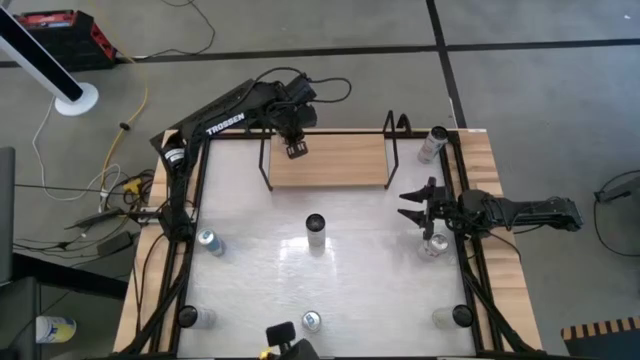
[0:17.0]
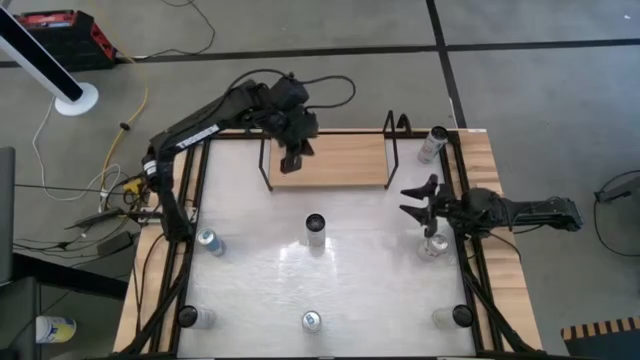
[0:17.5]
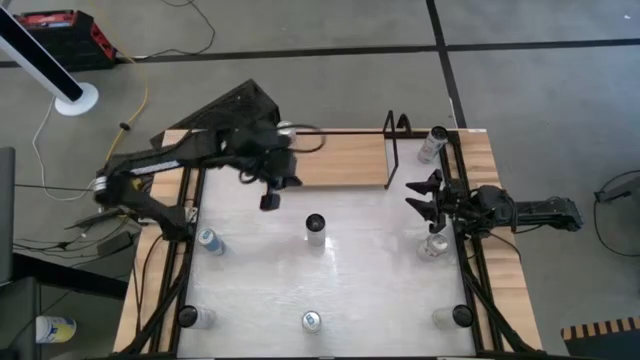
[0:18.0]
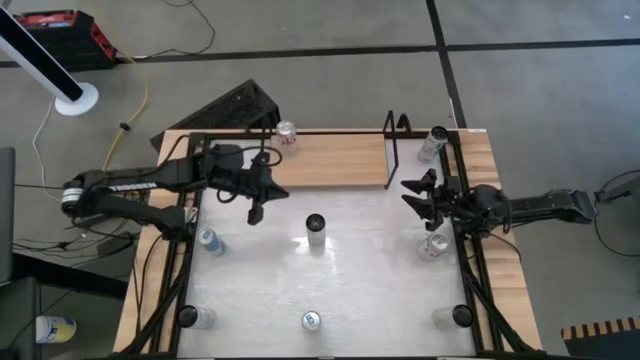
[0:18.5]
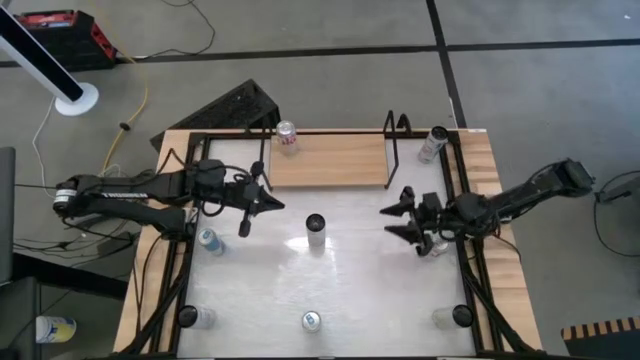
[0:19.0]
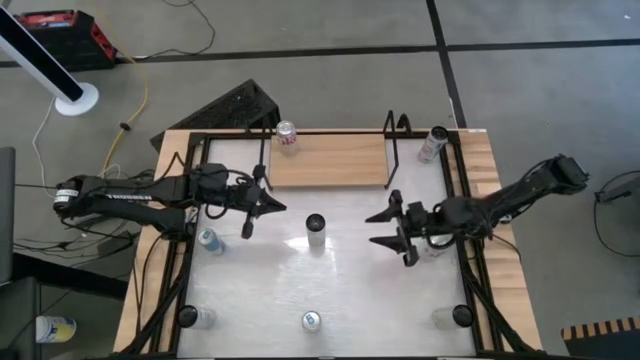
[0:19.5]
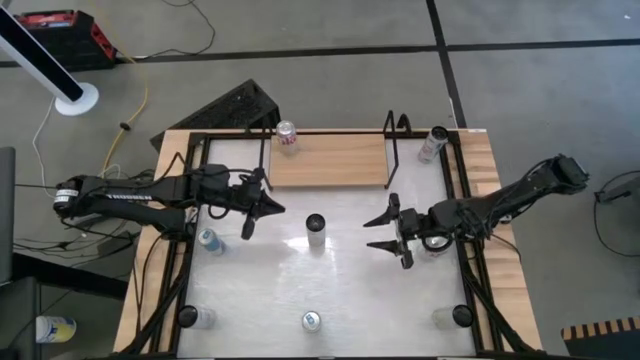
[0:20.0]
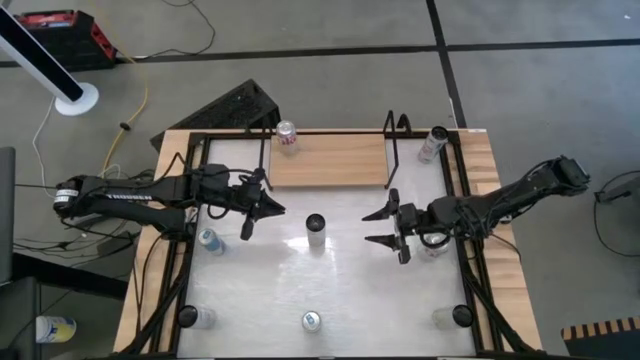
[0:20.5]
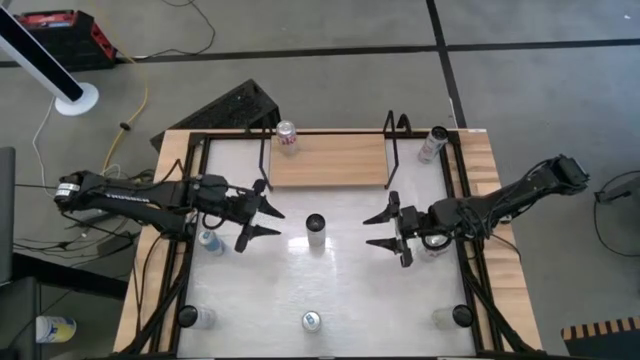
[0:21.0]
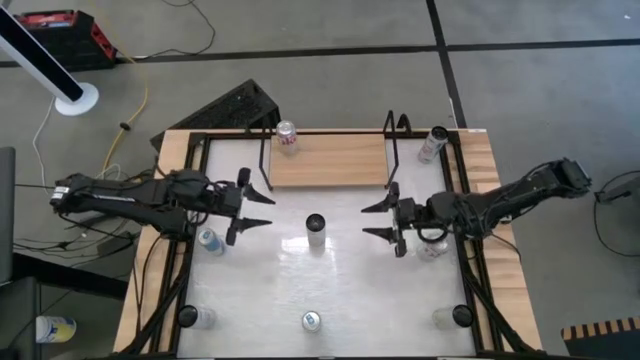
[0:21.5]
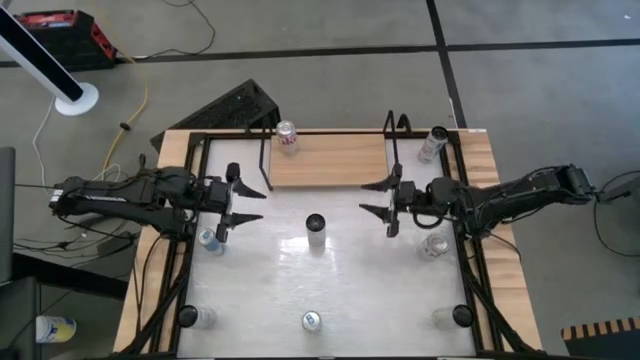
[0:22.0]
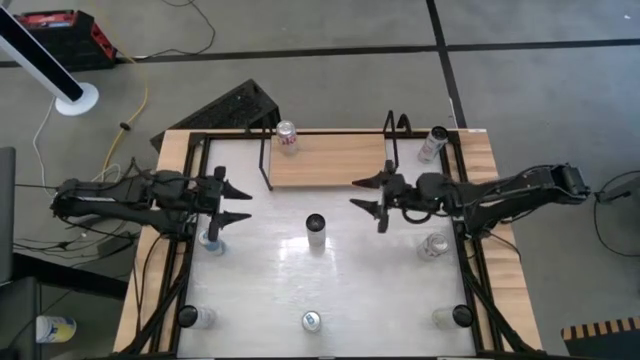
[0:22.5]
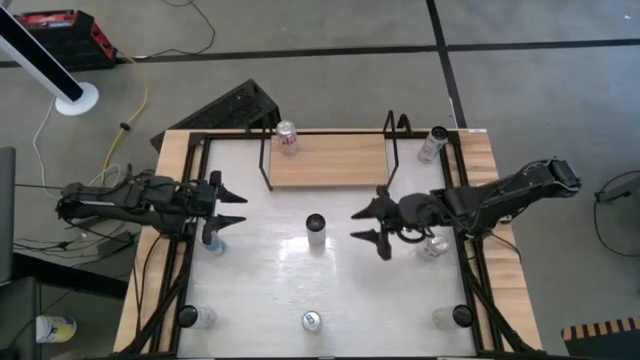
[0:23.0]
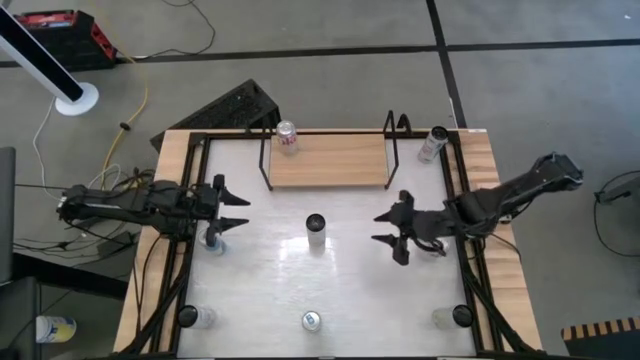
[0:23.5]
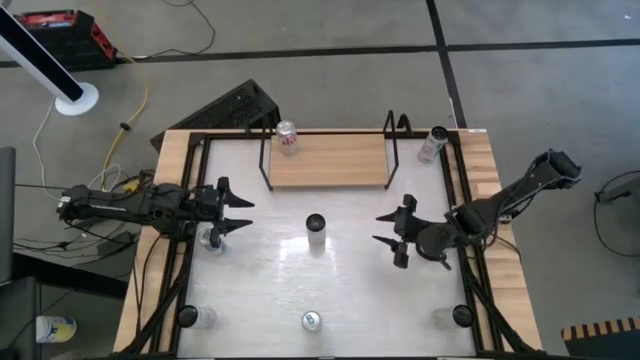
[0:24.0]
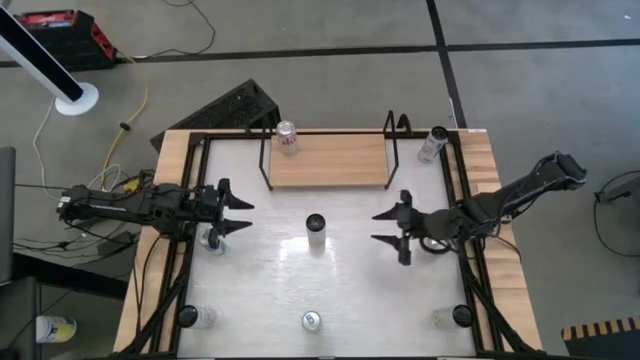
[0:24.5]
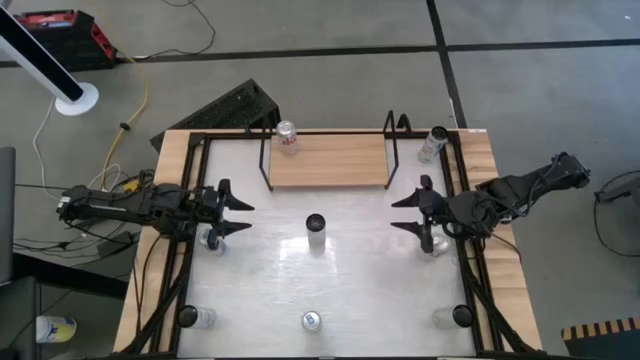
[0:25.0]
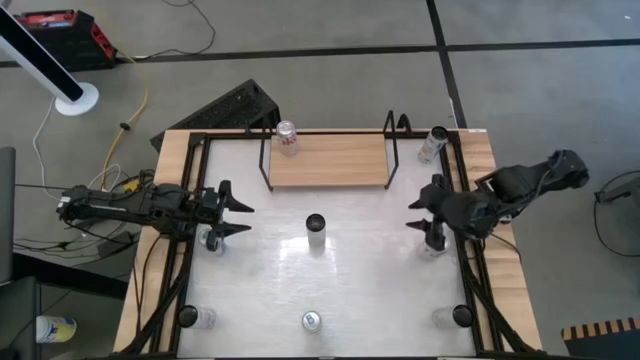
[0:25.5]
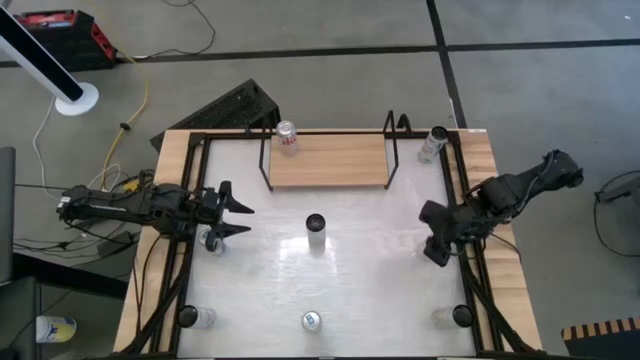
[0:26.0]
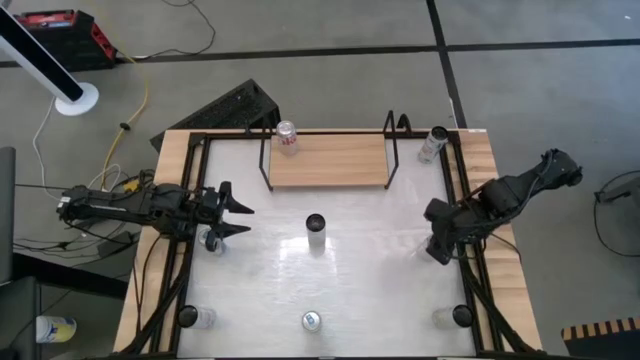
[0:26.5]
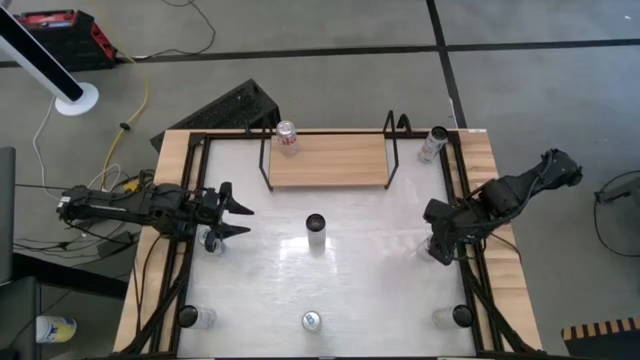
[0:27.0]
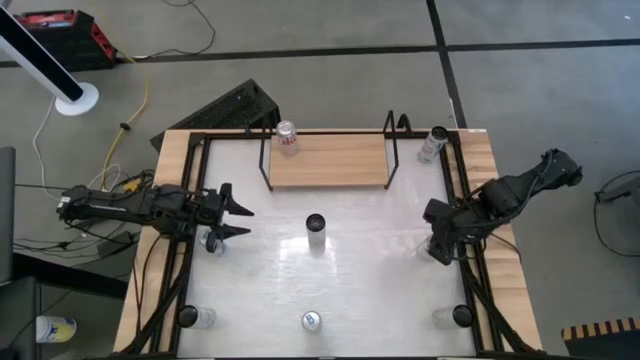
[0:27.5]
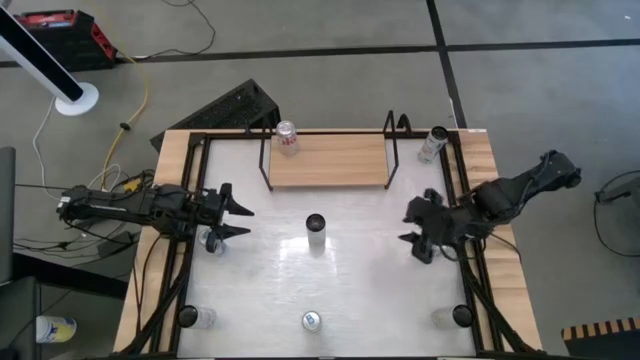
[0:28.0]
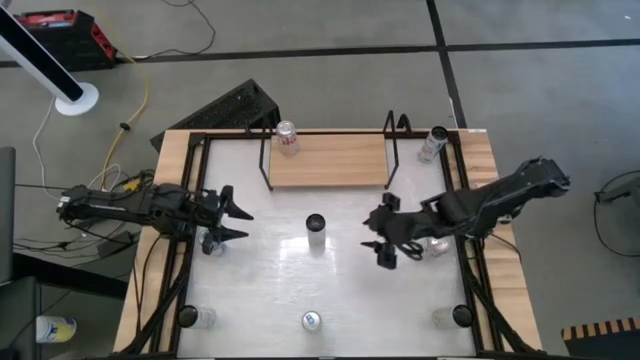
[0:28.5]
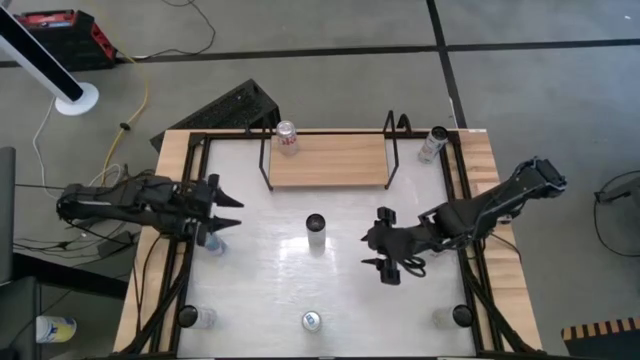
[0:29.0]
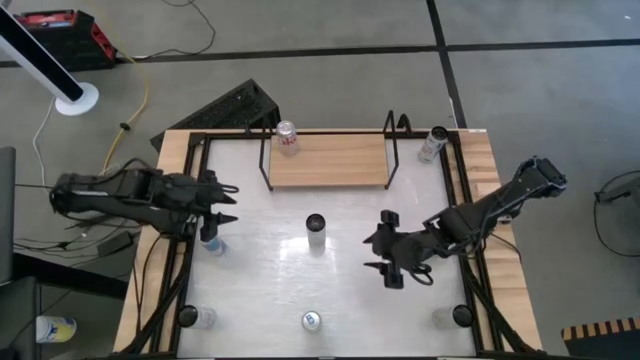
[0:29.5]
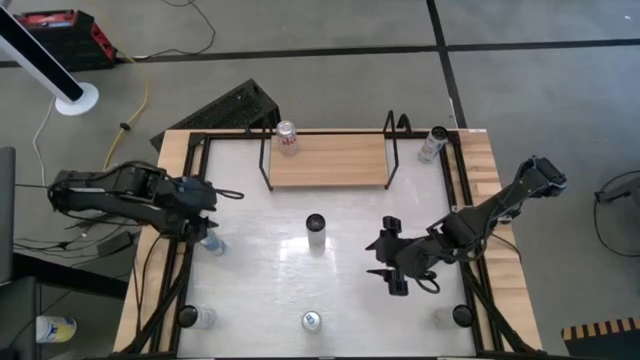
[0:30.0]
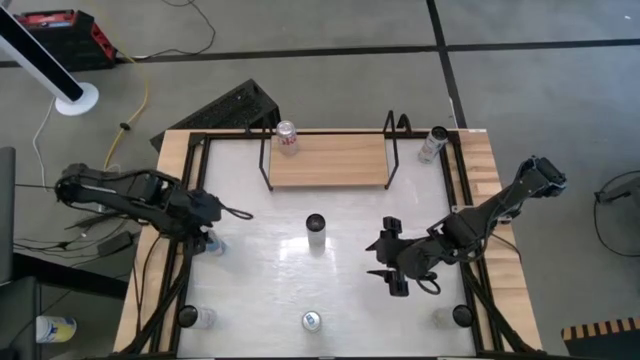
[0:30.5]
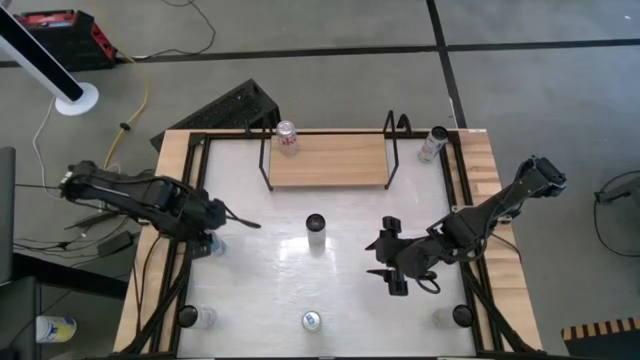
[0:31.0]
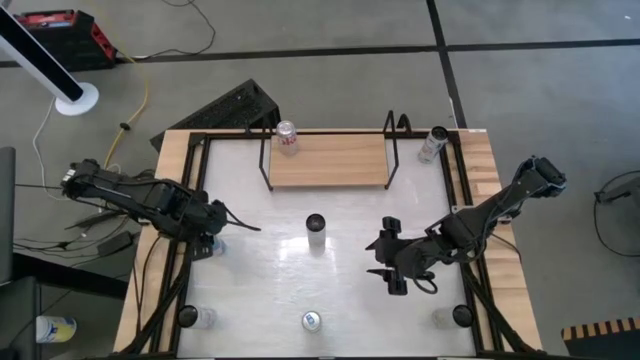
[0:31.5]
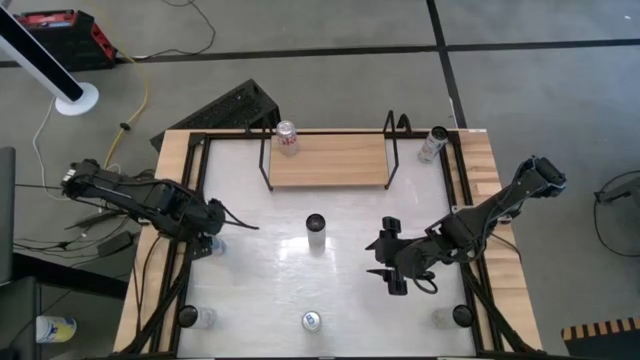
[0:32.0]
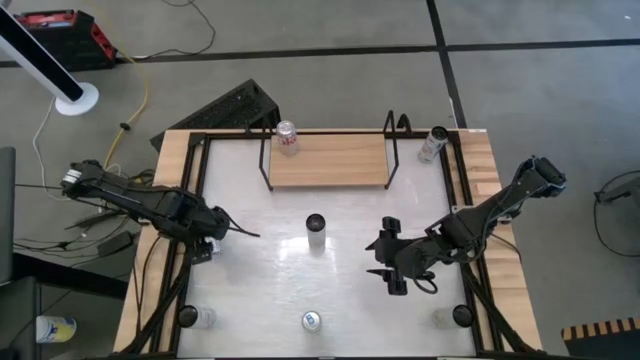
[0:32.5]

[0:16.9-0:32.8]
Task: Place canned beverage on shelf
Put the top left blue soda can on the shelf

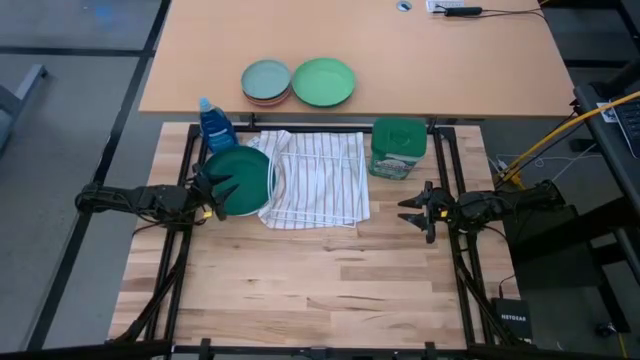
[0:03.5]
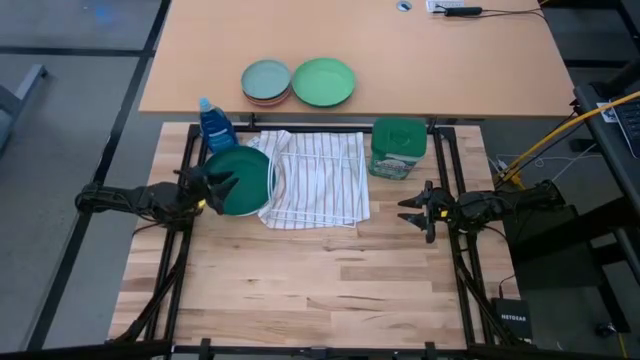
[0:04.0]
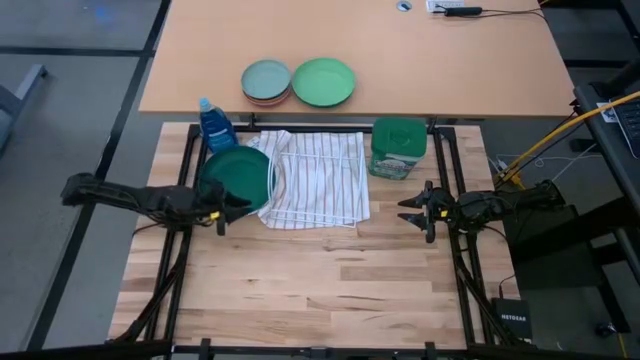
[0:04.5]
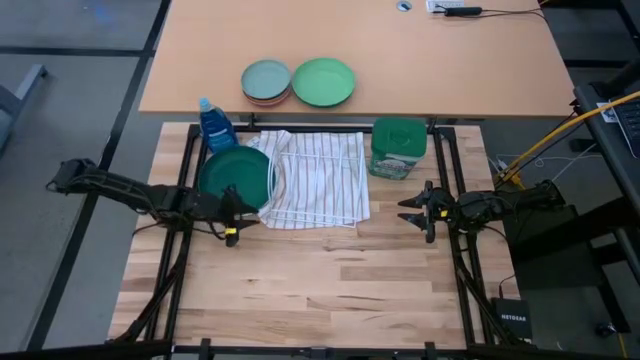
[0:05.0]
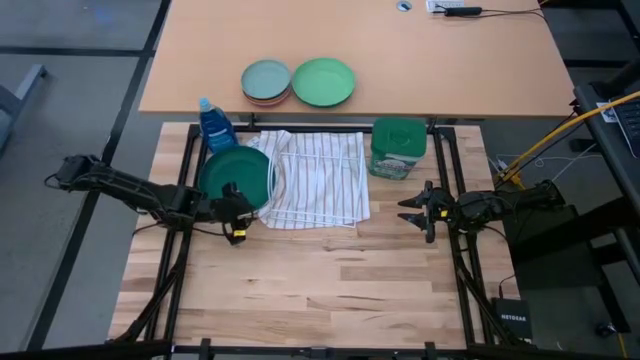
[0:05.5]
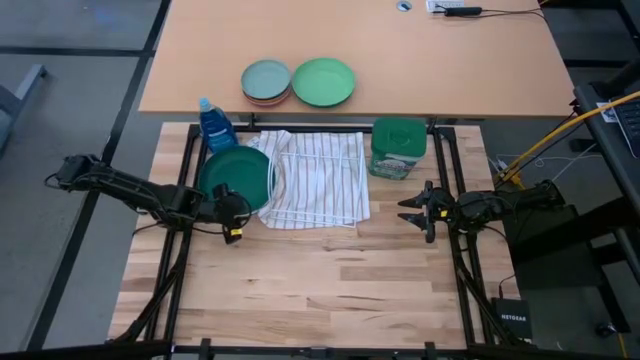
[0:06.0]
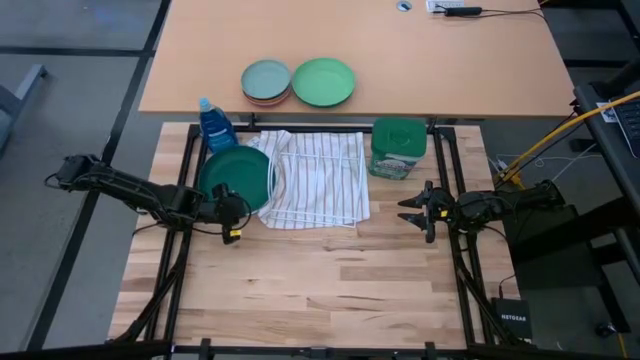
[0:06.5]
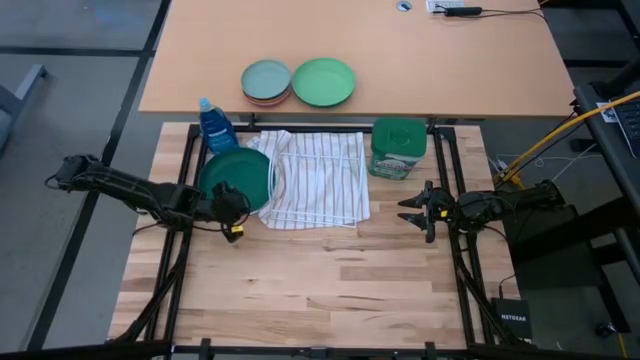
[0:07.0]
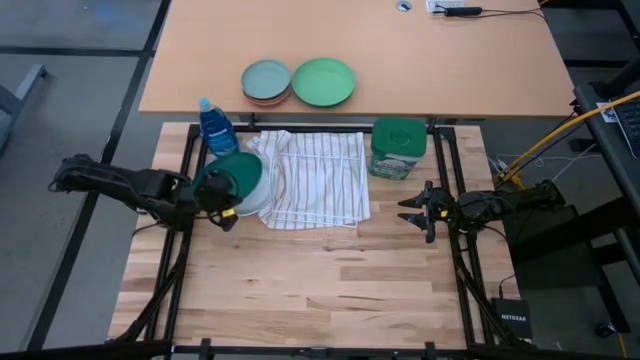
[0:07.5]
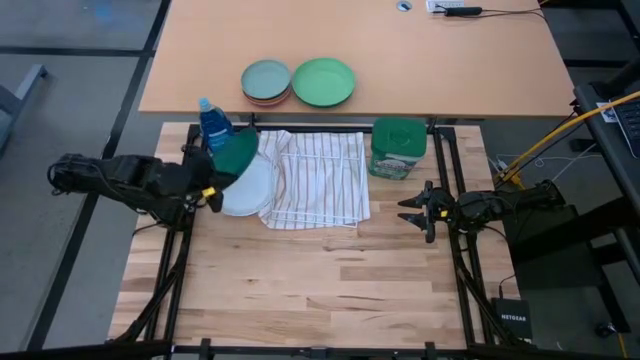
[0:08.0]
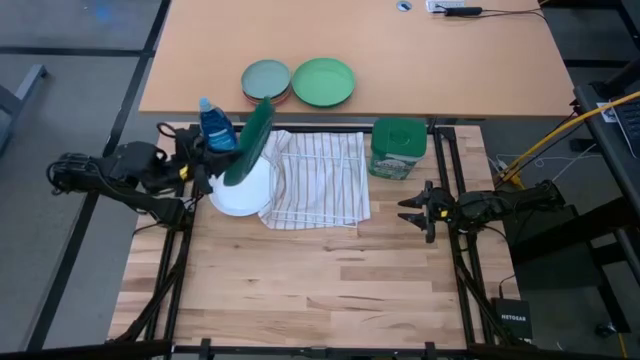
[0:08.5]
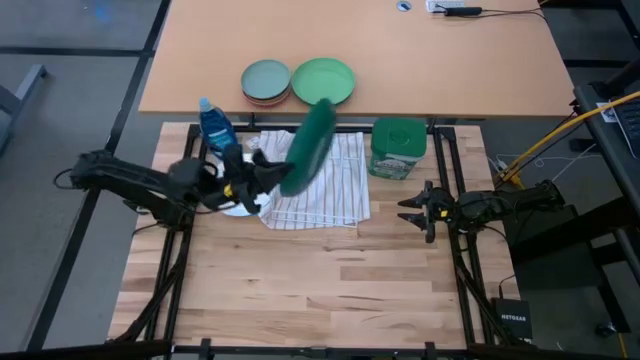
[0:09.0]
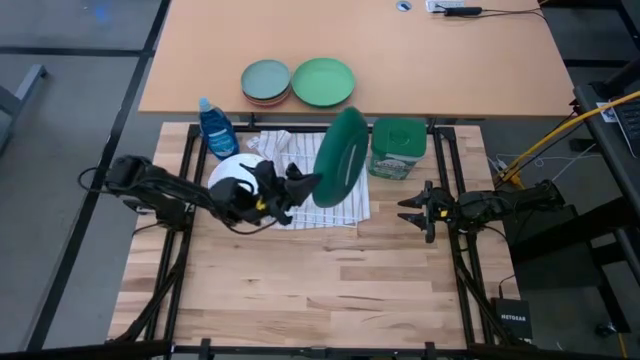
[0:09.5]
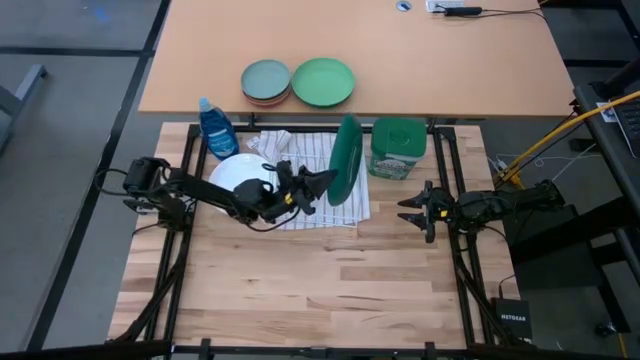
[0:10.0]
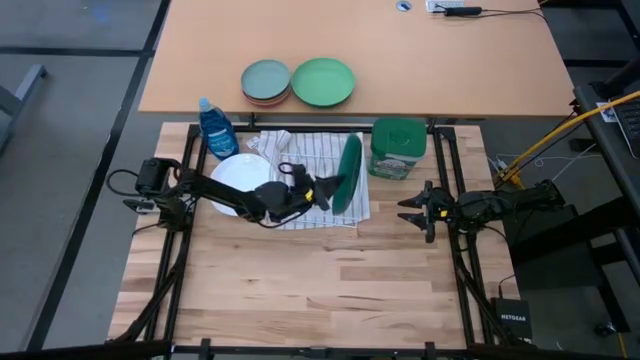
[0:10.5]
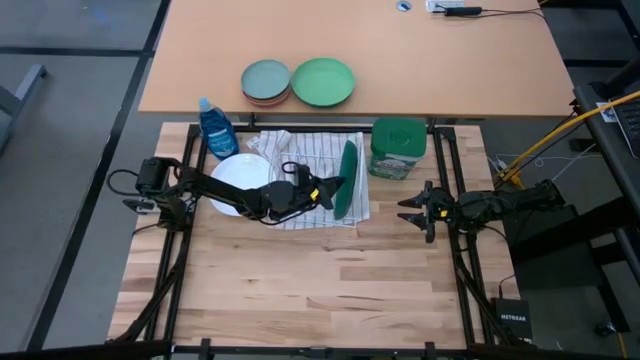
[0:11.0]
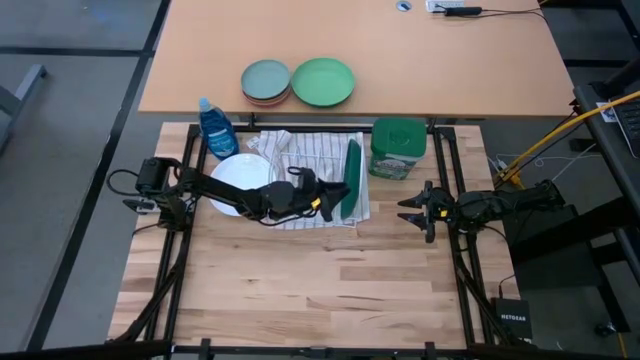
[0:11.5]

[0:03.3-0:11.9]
Task: Sort dishes
Put the dark green plate into the dish rack
